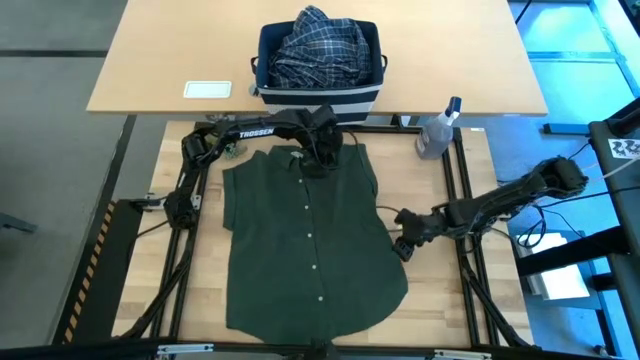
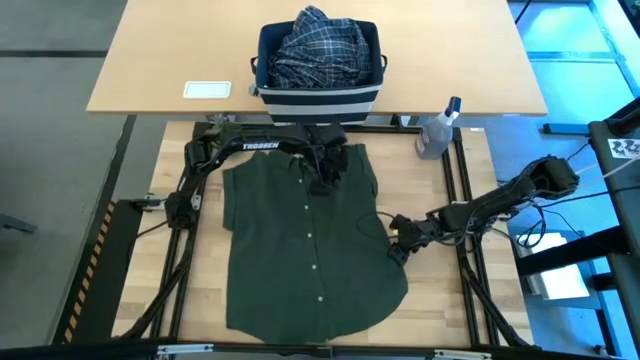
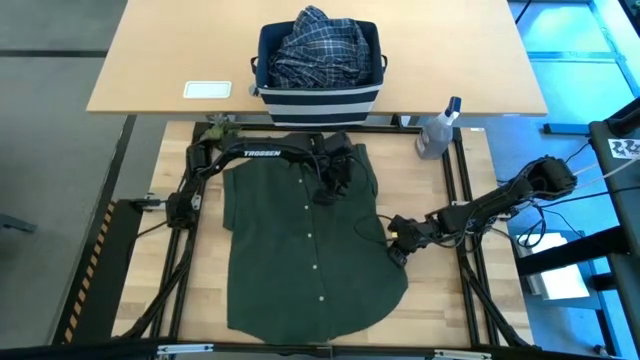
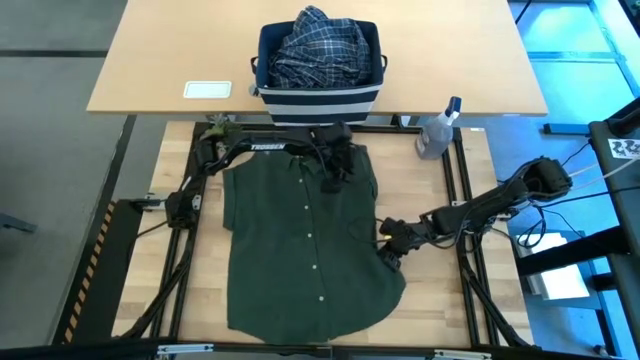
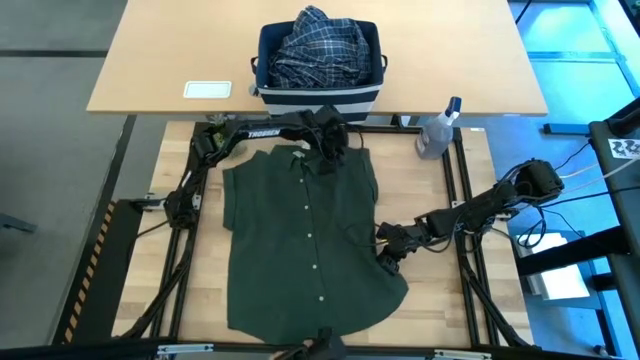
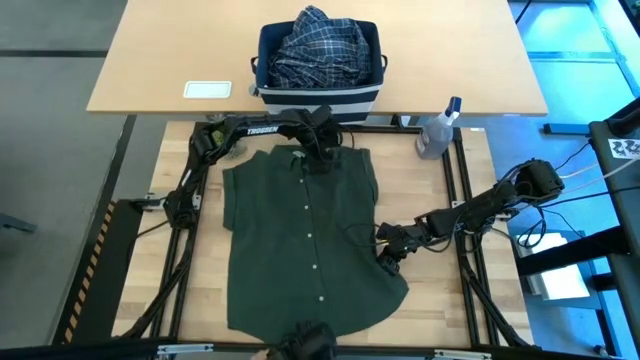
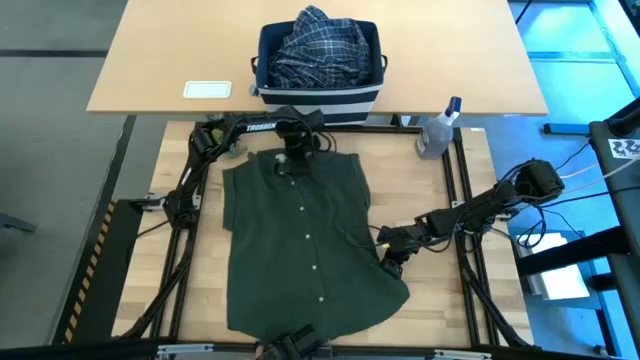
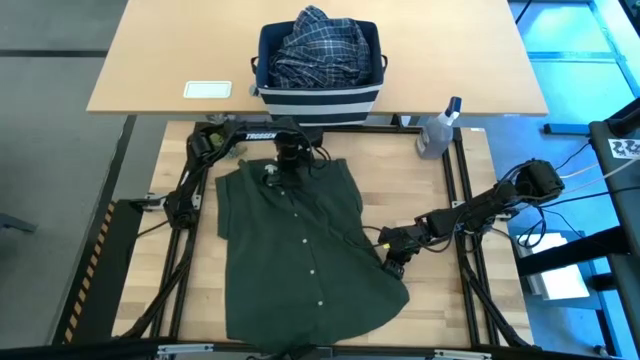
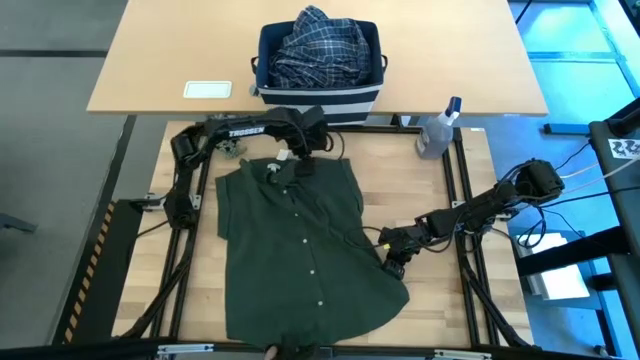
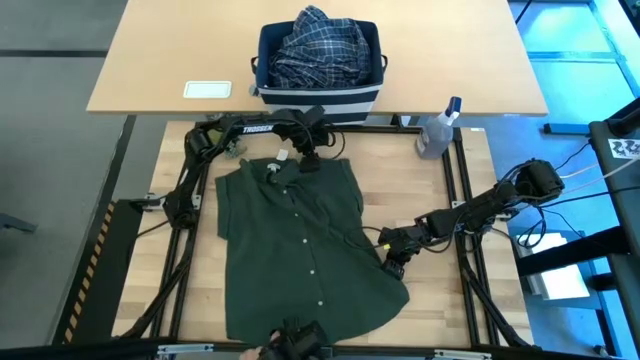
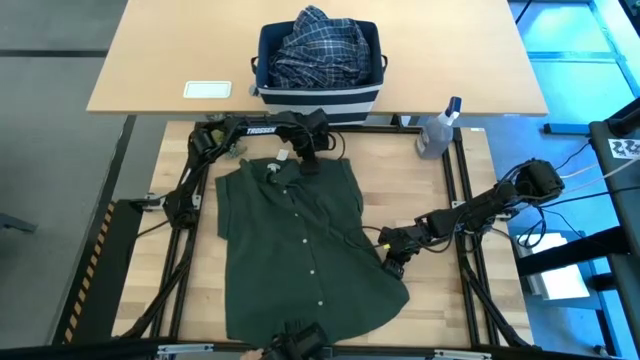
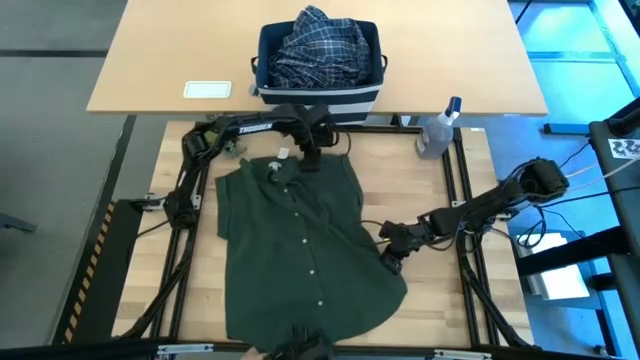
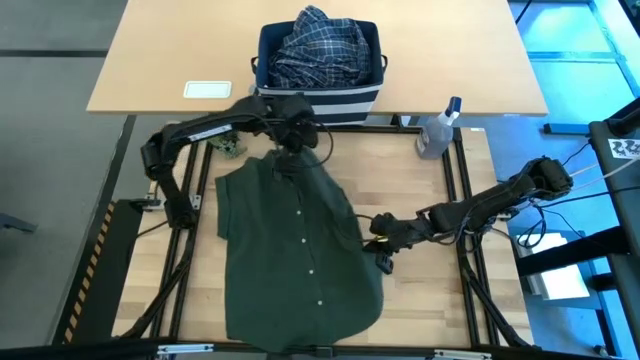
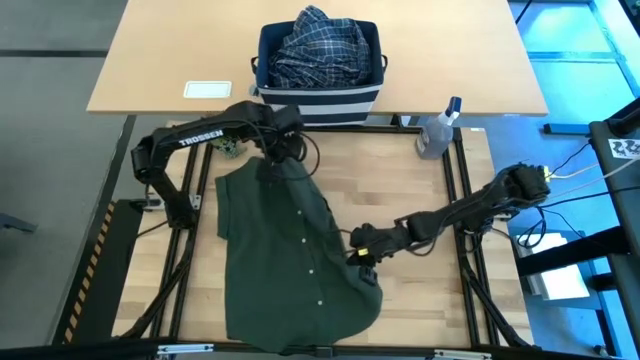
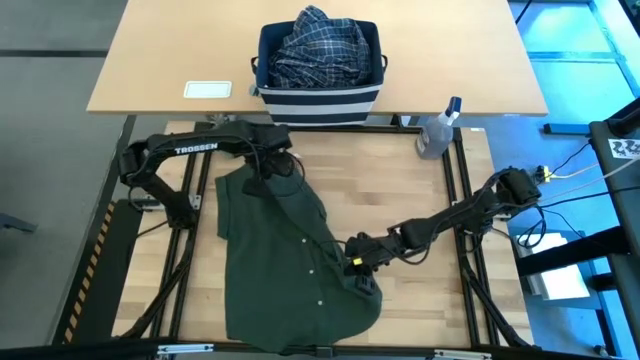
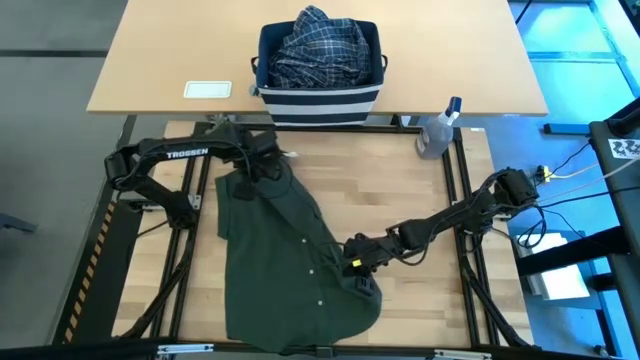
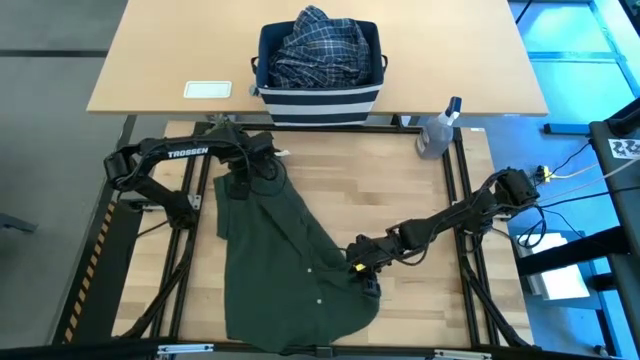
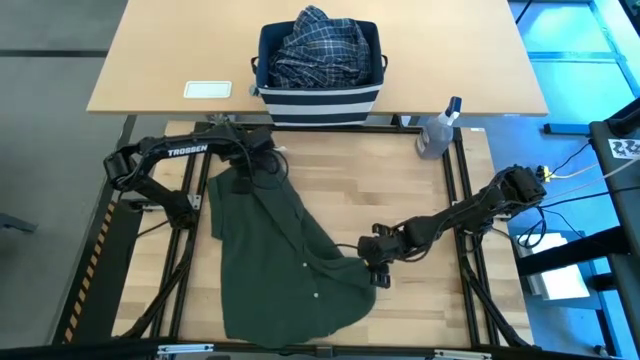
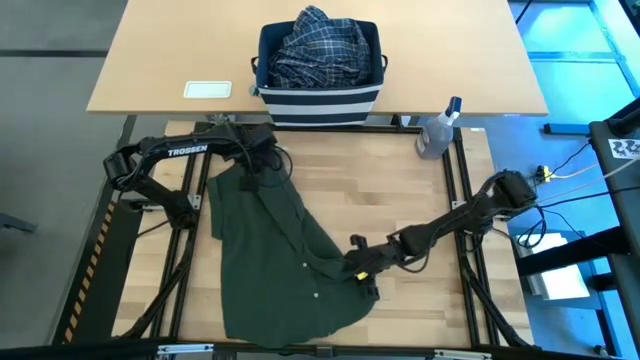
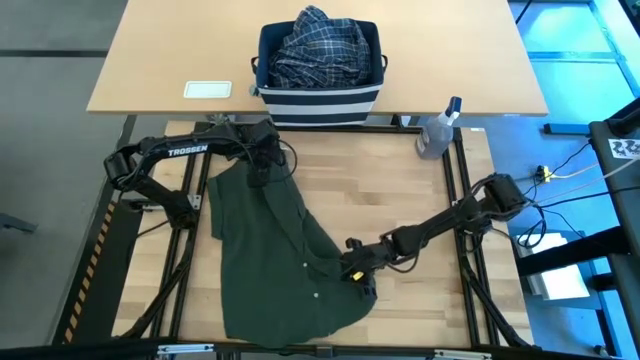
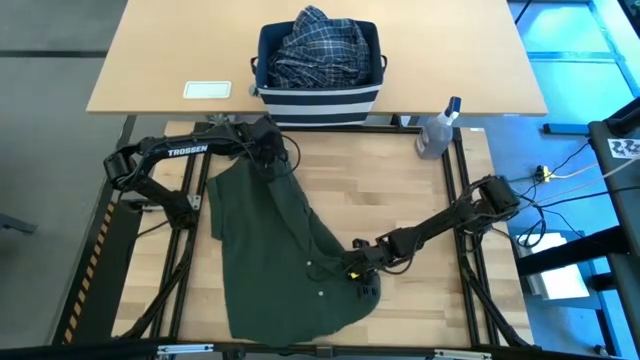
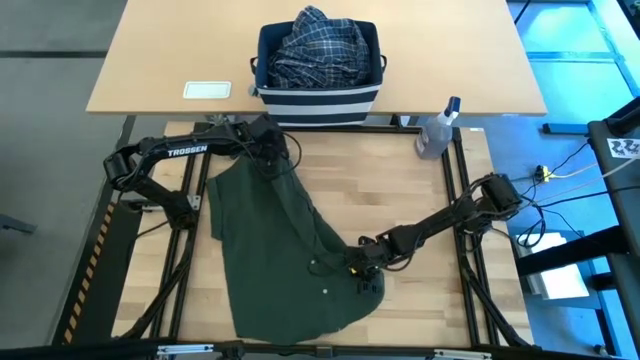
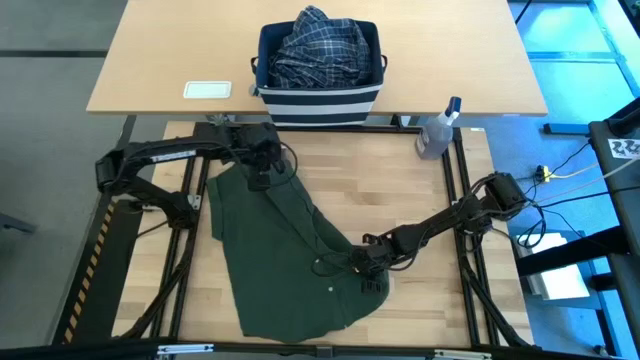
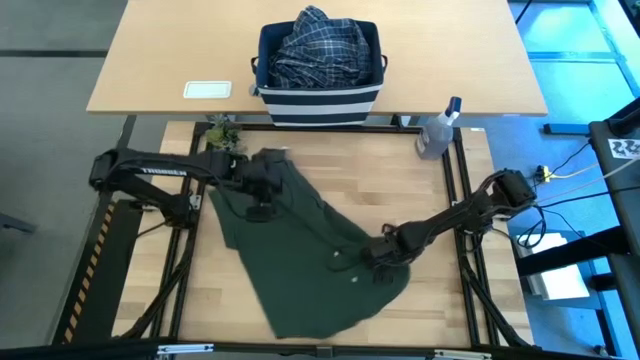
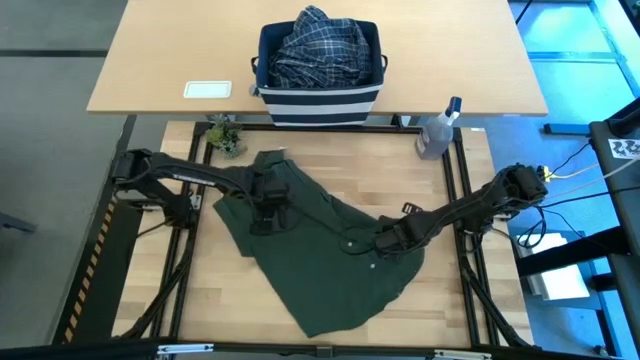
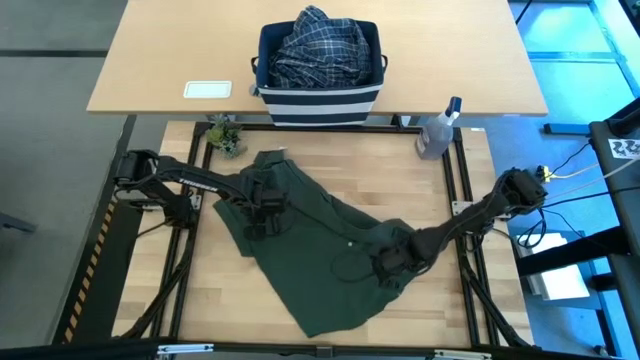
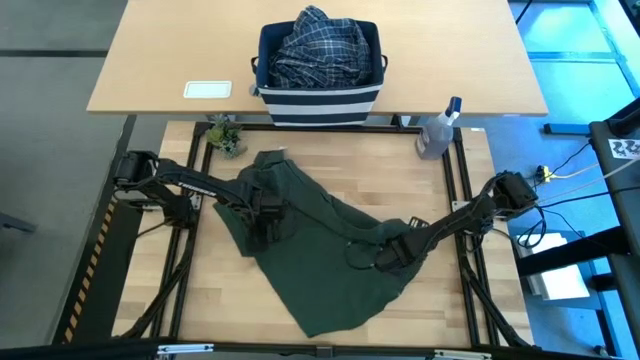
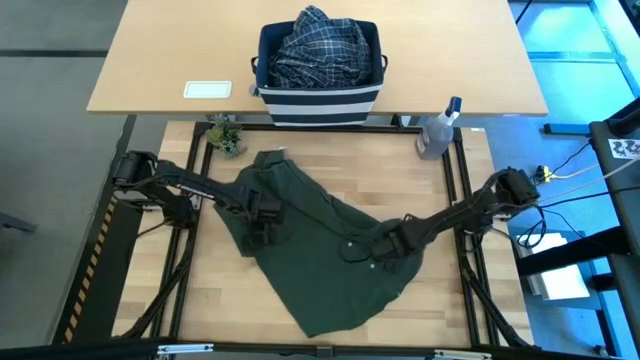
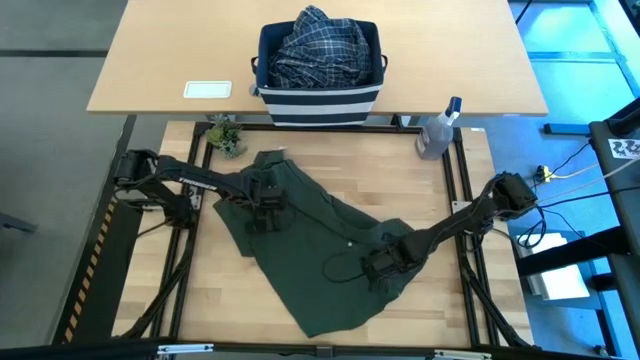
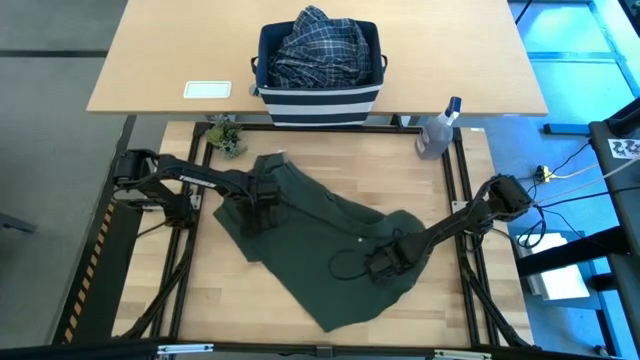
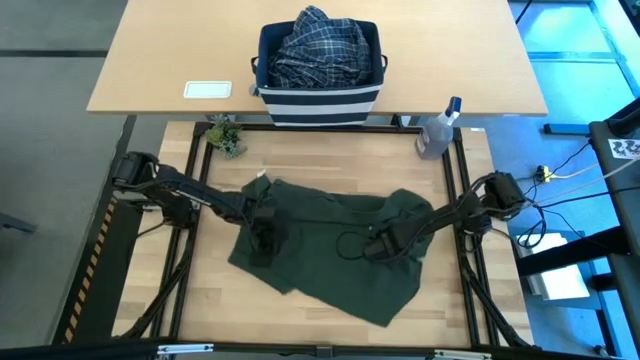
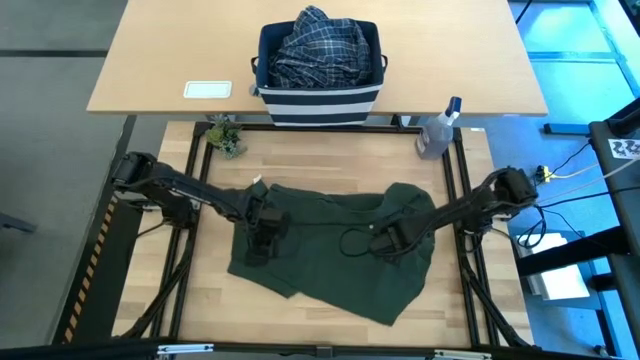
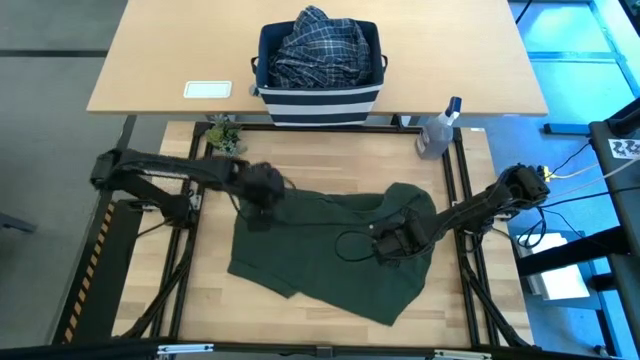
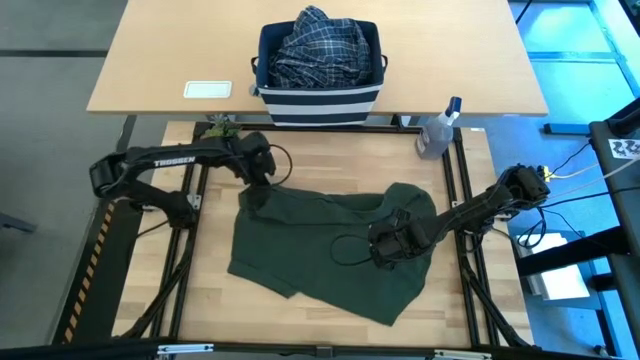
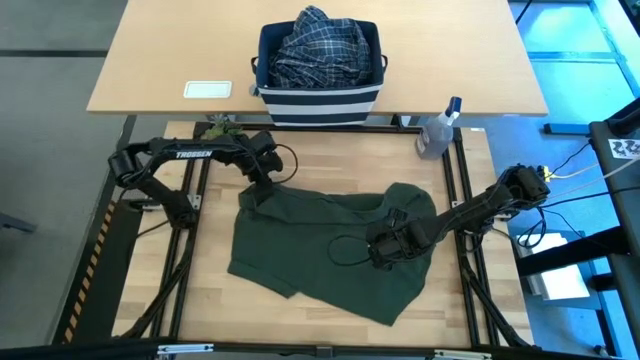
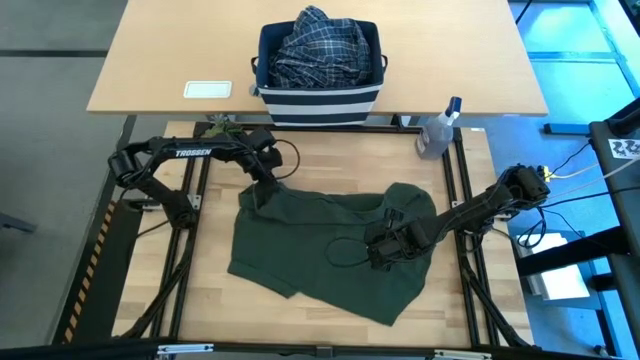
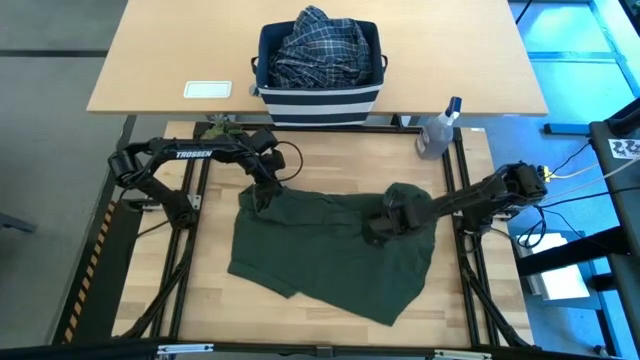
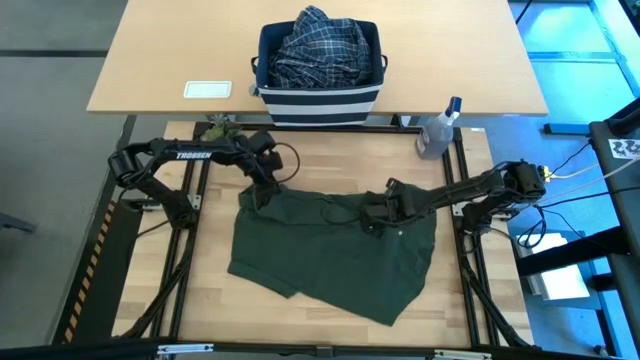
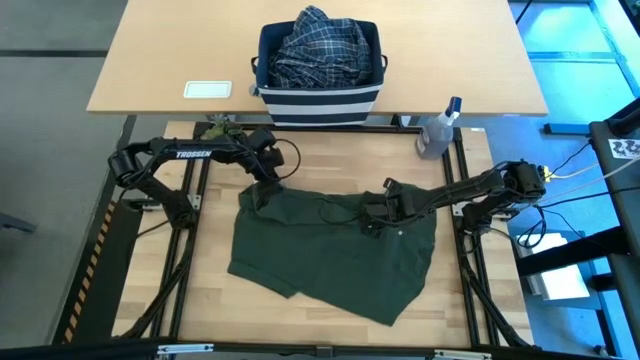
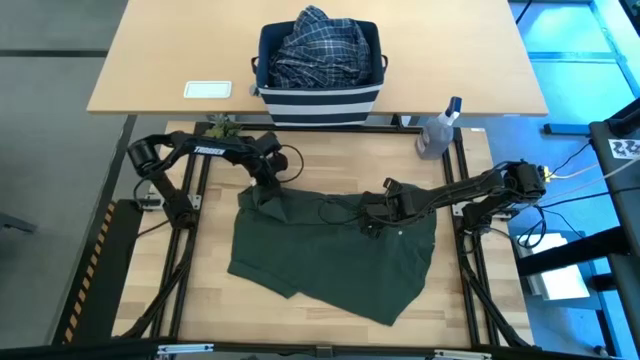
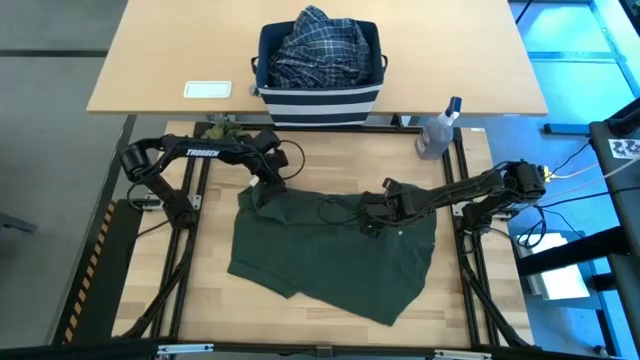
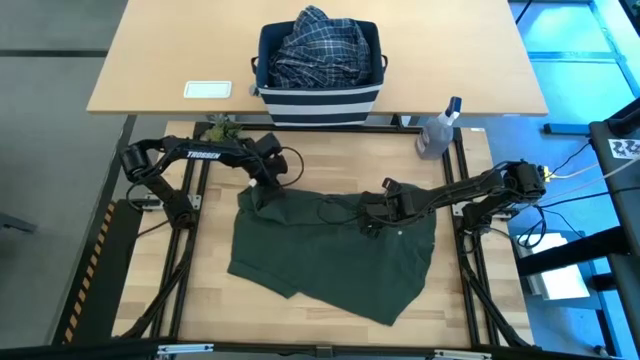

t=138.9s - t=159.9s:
Task: Fold Laundry from Bin
Fold the green polo shirt
